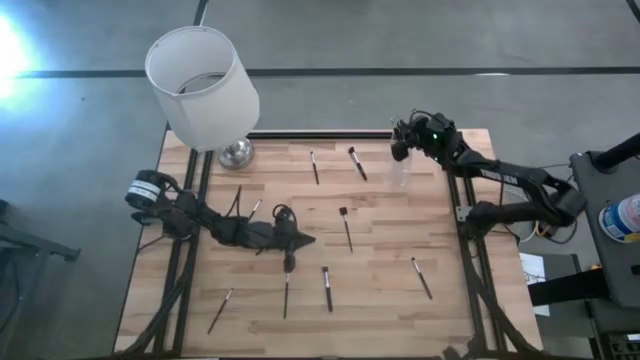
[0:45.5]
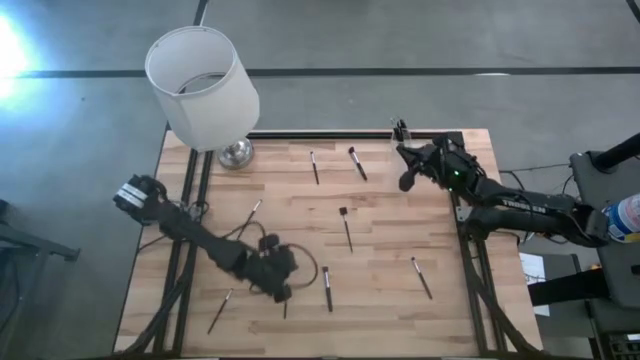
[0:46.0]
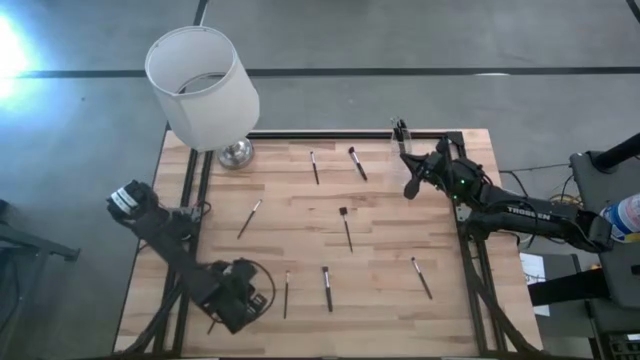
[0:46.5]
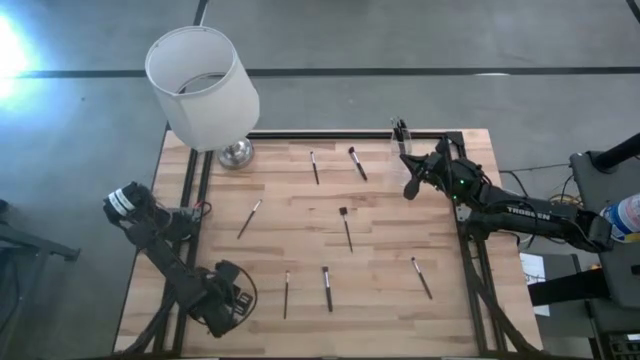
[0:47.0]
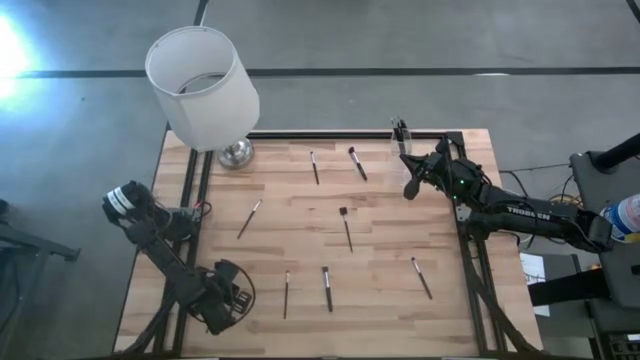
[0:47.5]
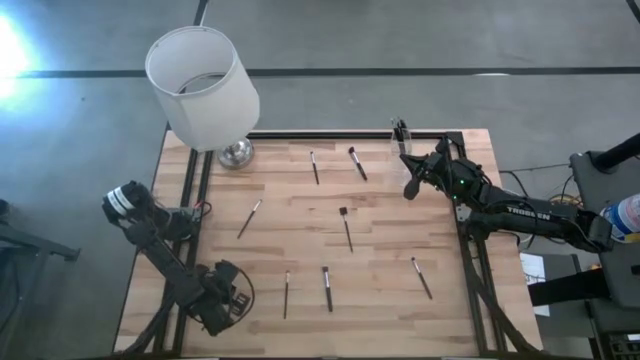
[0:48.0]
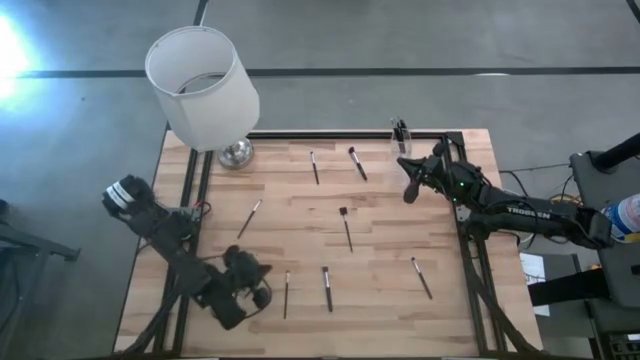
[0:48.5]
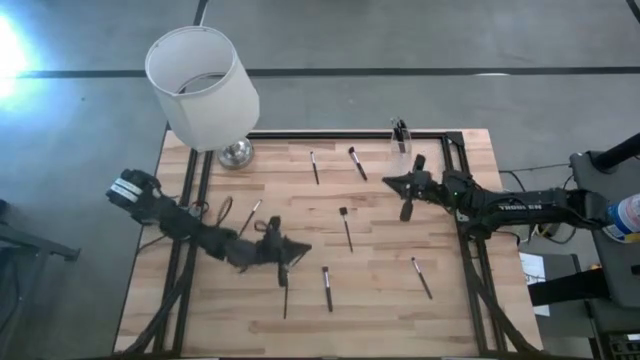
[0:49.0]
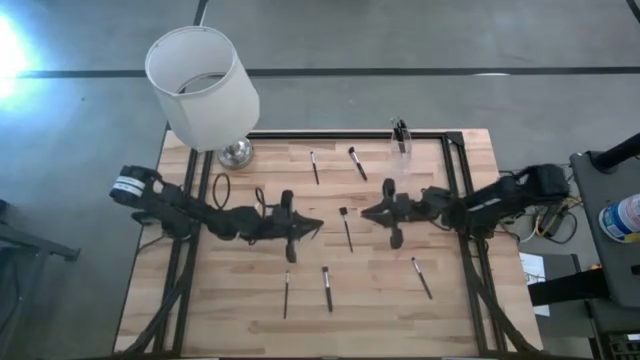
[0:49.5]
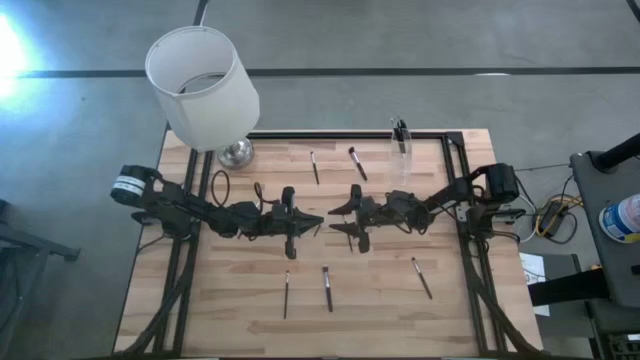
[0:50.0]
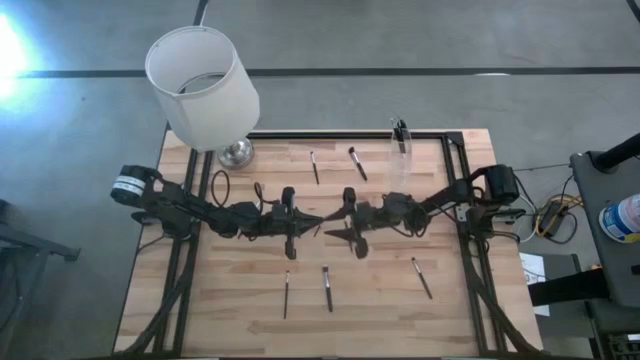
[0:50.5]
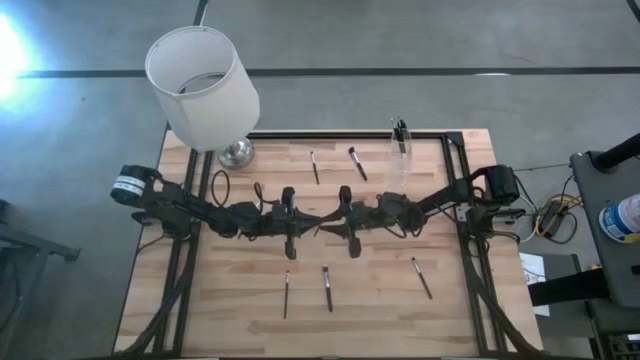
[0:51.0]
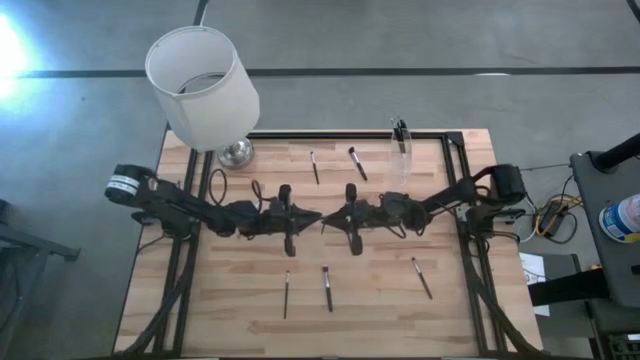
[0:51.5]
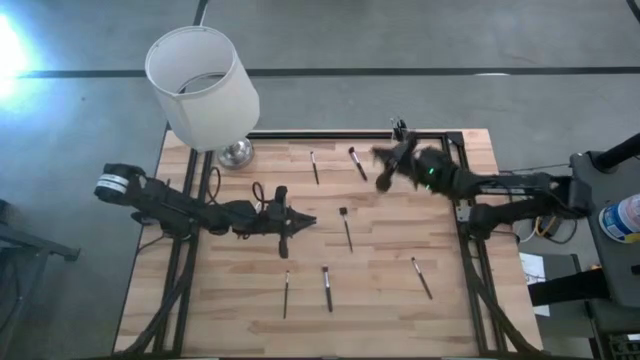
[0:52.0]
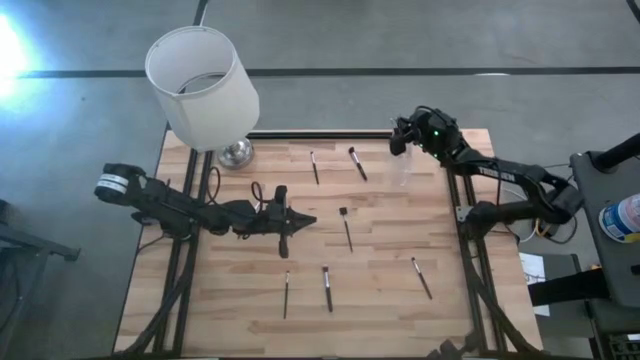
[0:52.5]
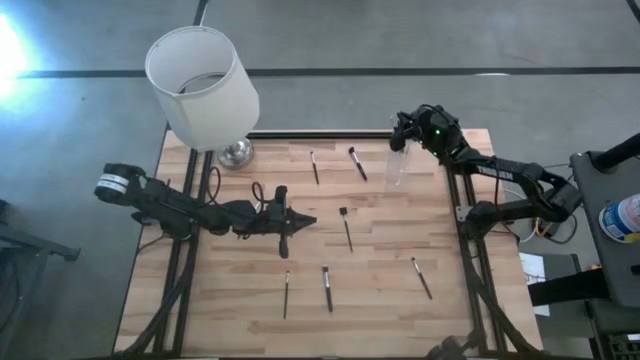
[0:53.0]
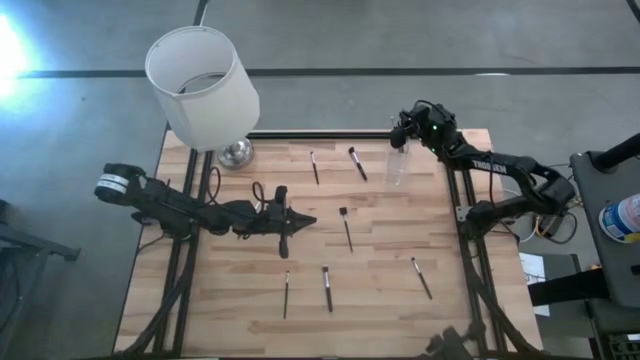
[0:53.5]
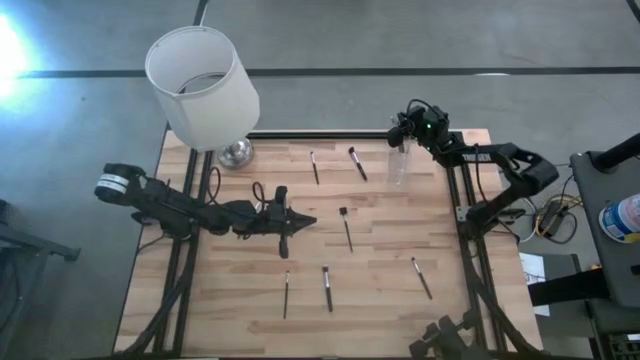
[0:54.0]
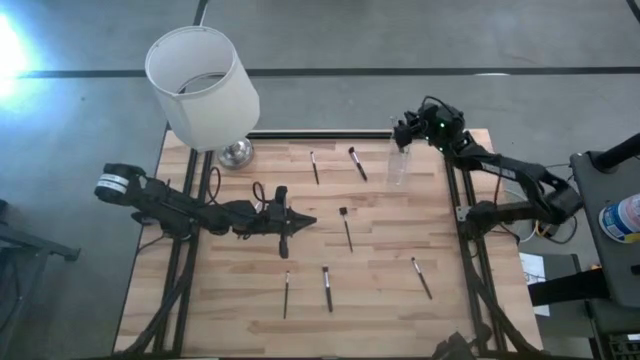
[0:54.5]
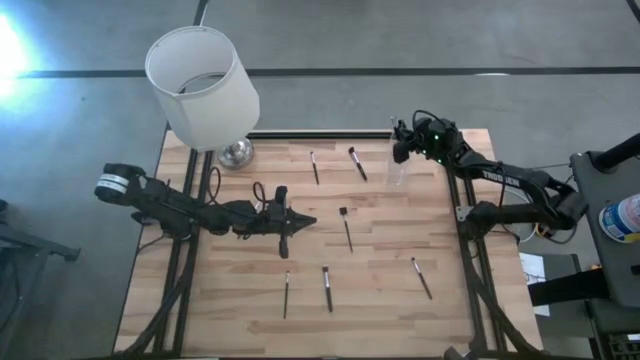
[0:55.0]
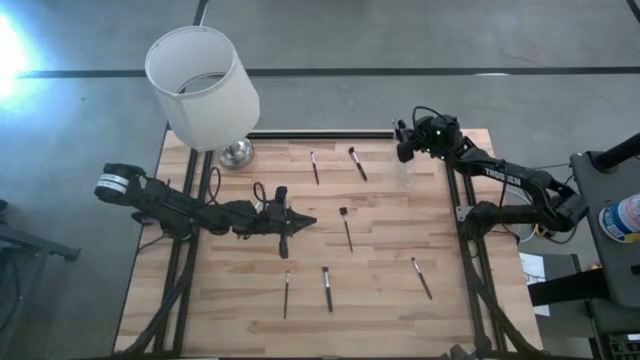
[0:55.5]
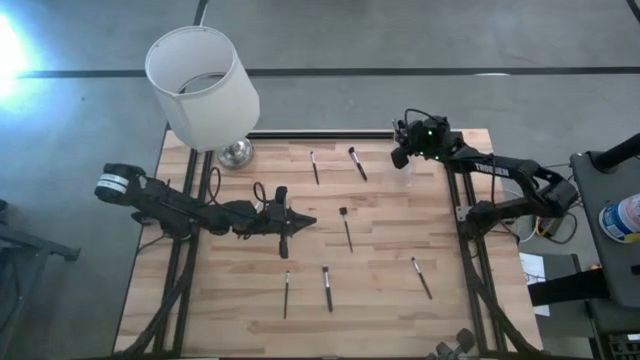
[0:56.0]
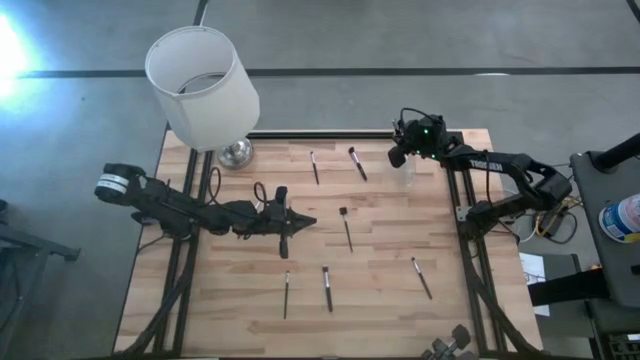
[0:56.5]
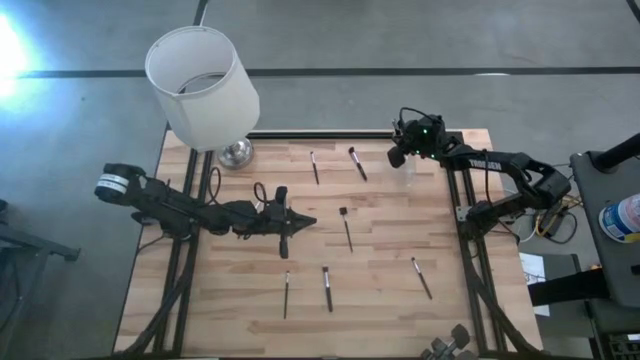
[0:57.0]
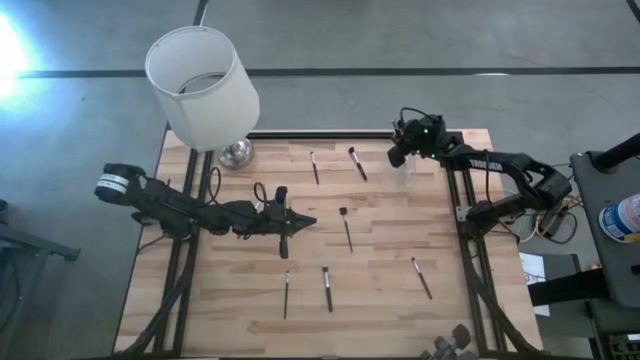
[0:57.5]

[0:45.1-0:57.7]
Task: Put items in baskets/containers
Put the eyeshadow brush into the transparent organizer

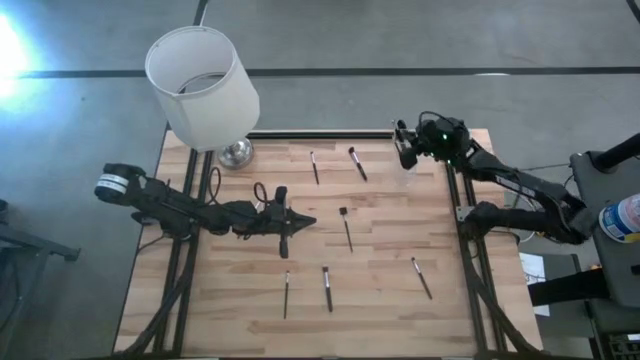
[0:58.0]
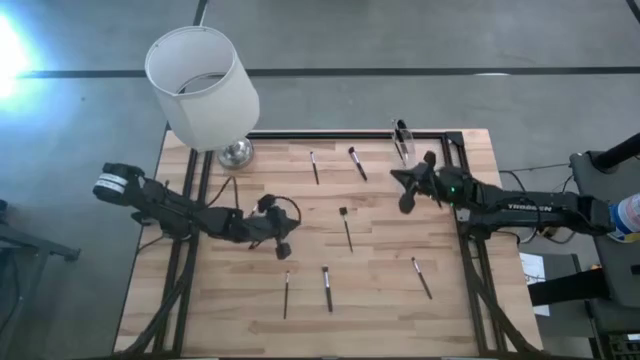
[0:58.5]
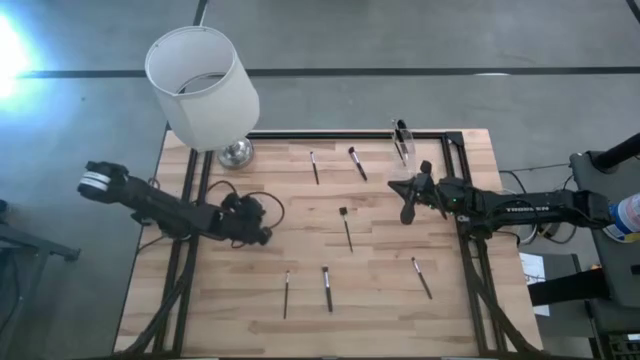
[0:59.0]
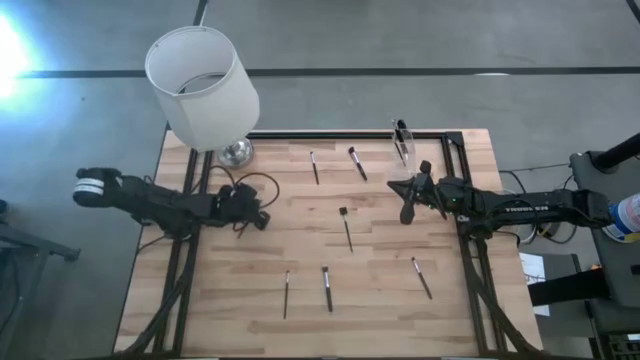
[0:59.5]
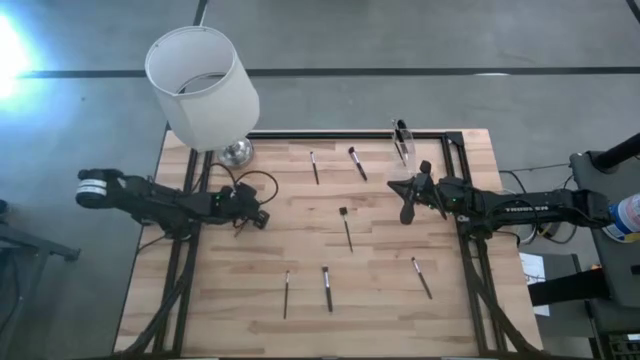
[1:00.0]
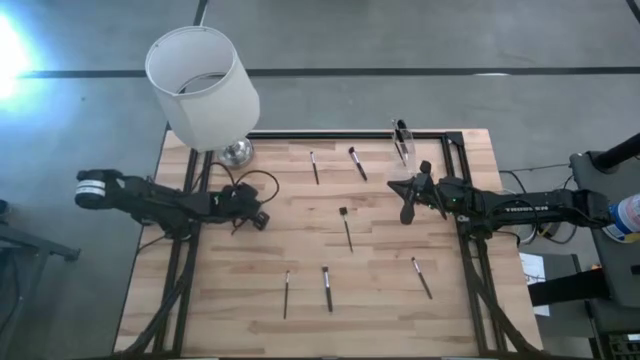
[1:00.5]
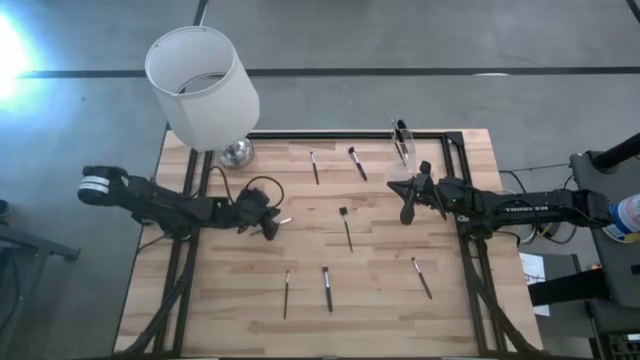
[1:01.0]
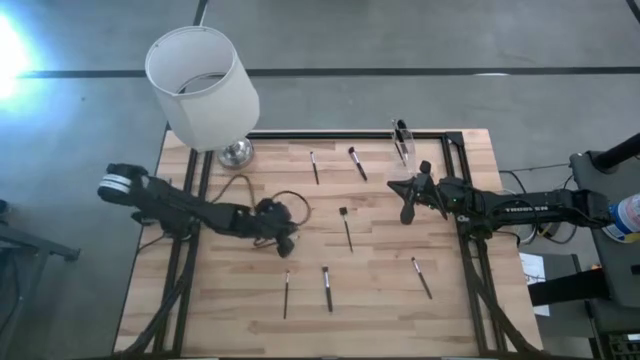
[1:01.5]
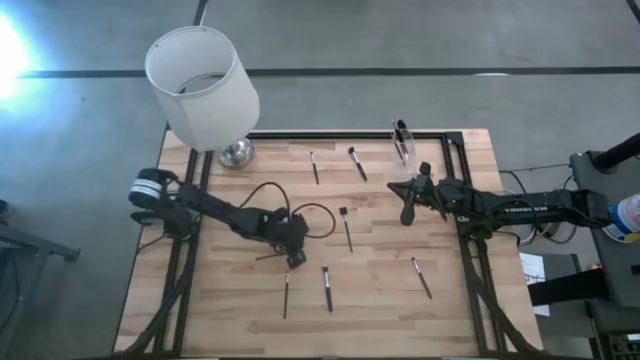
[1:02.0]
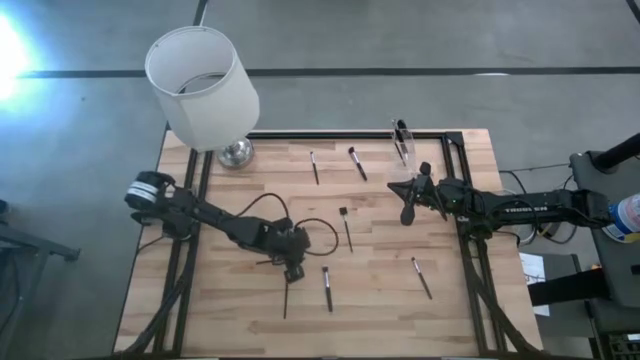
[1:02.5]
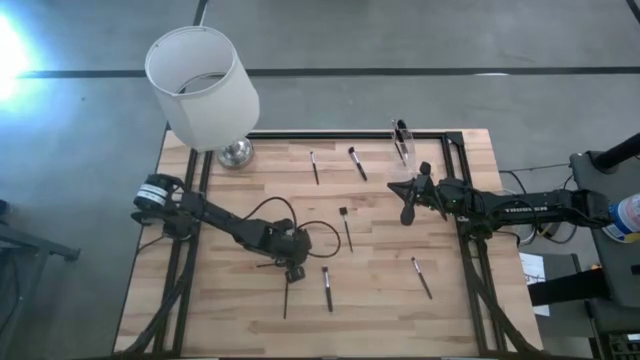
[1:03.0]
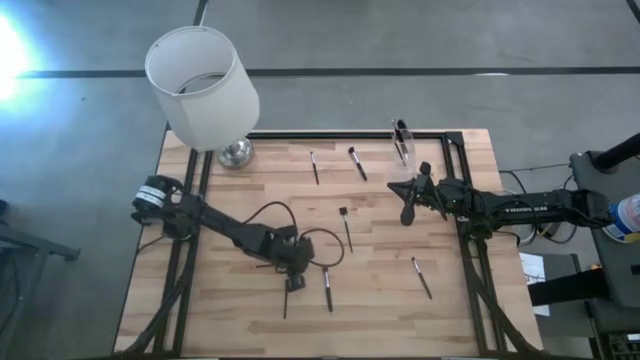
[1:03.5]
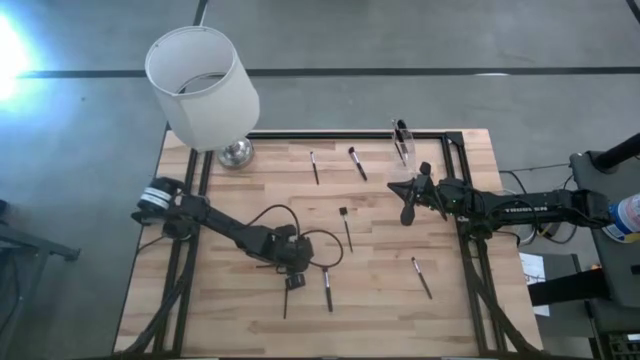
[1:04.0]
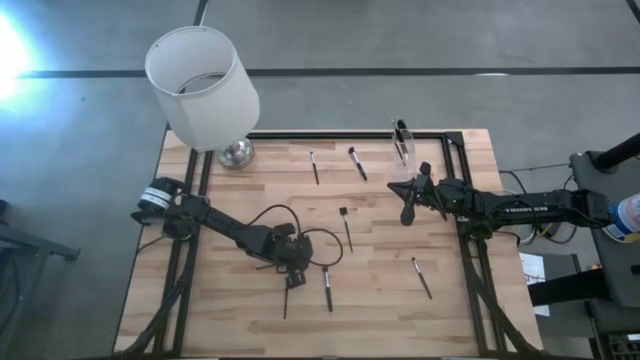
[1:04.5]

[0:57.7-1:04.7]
Put the eyeshadow brush into the transparent organizer

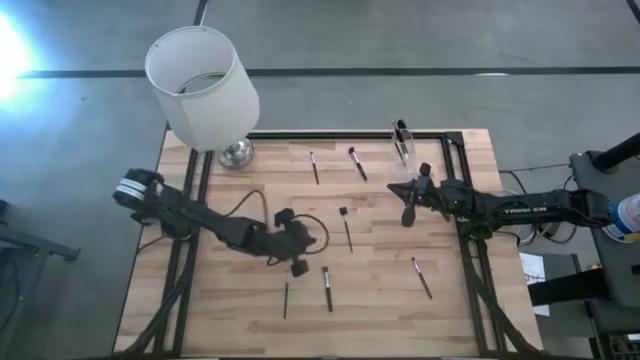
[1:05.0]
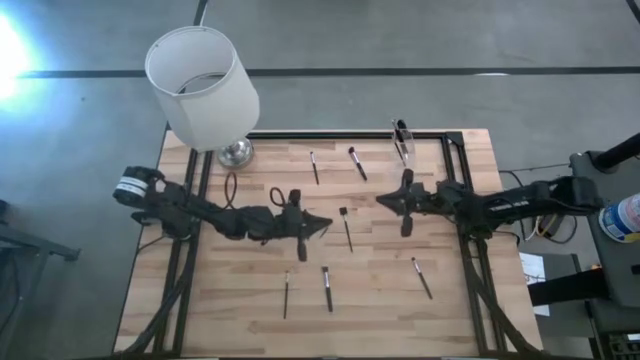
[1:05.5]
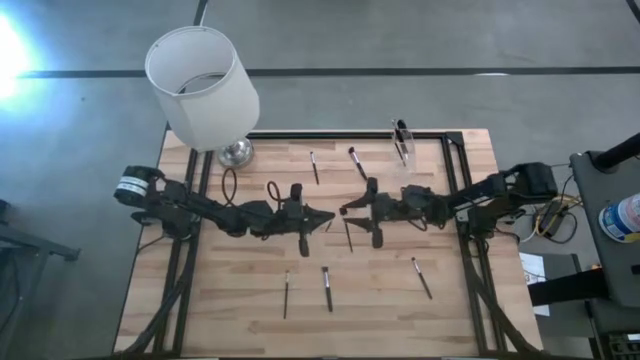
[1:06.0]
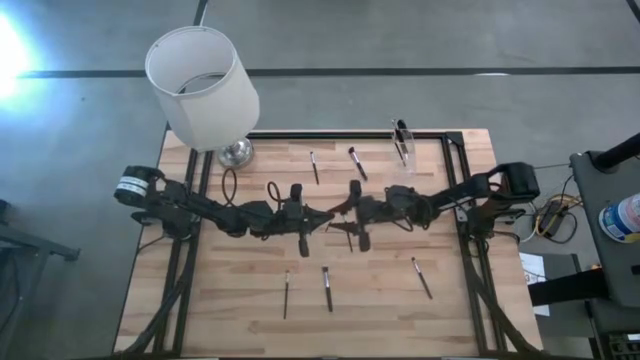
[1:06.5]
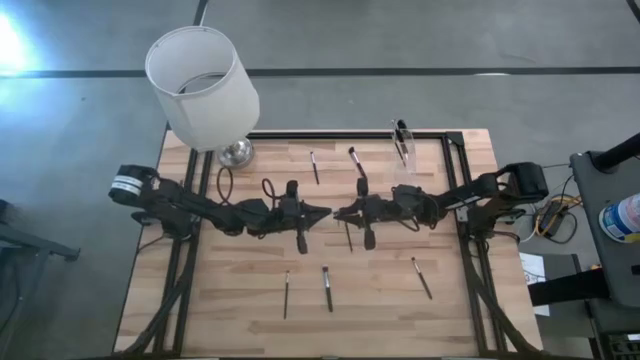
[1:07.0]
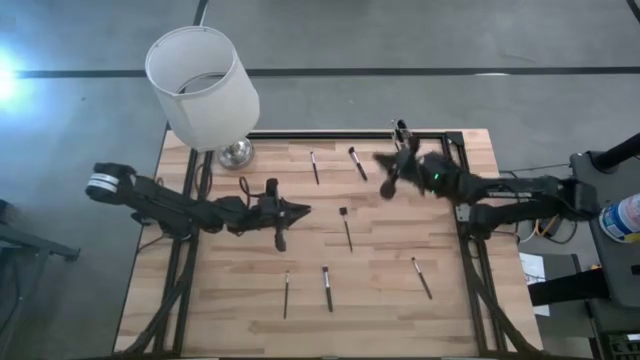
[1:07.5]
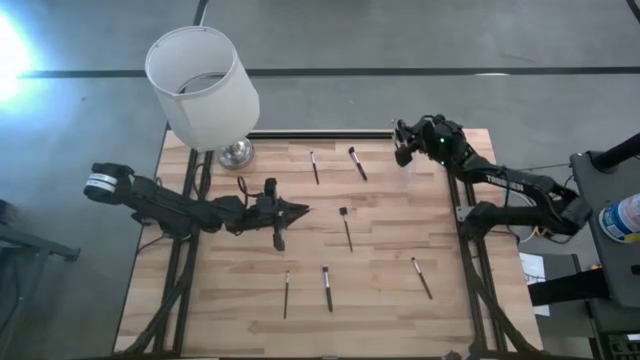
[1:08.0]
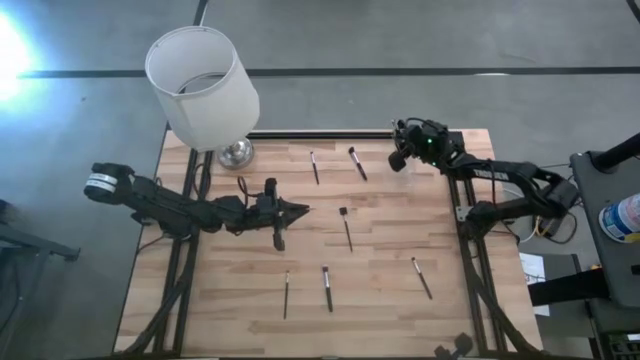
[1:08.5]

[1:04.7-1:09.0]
Put the eyeshadow brush into the transparent organizer
